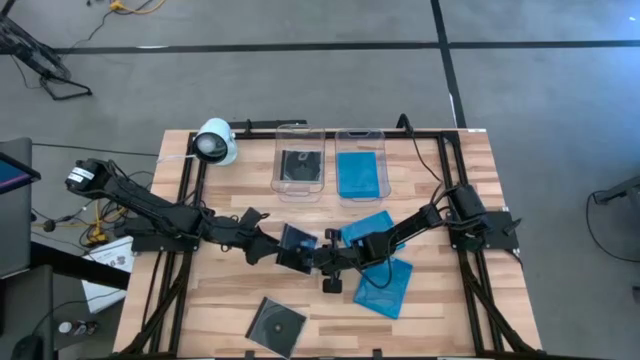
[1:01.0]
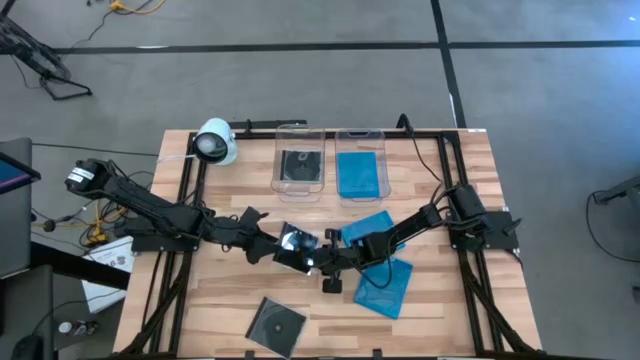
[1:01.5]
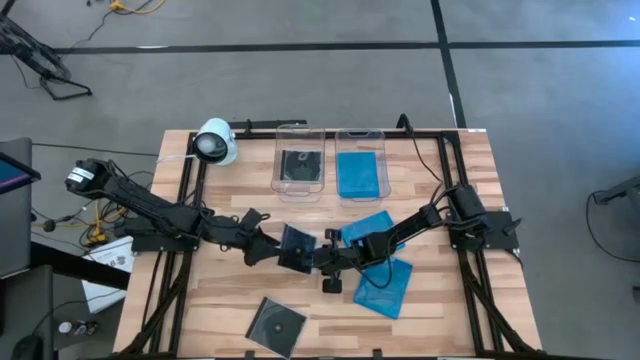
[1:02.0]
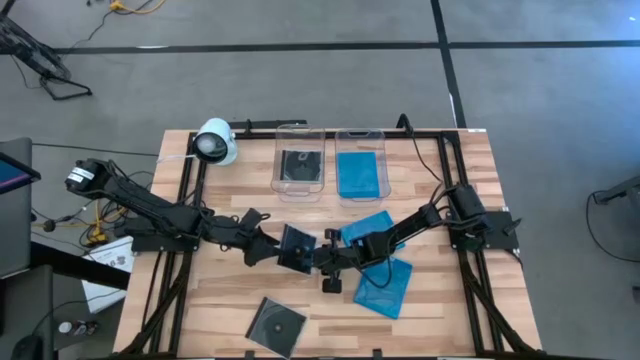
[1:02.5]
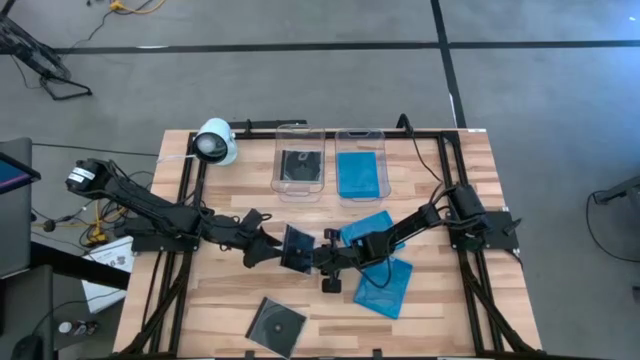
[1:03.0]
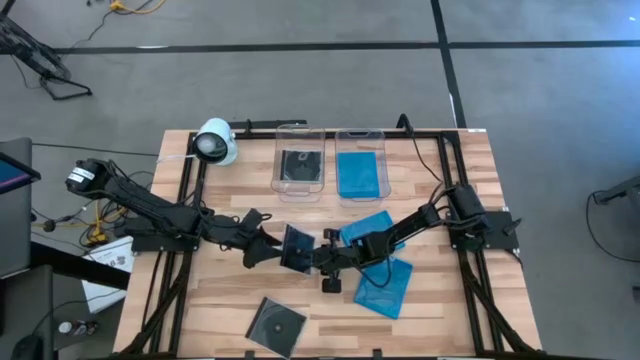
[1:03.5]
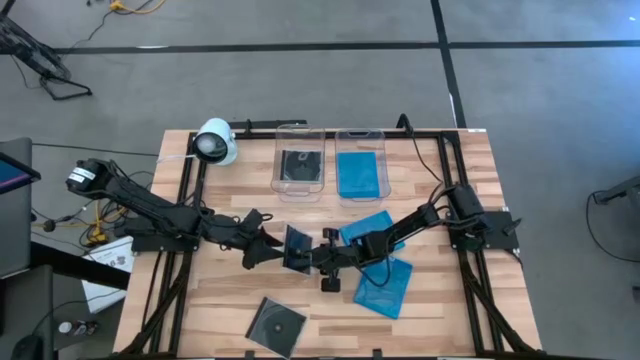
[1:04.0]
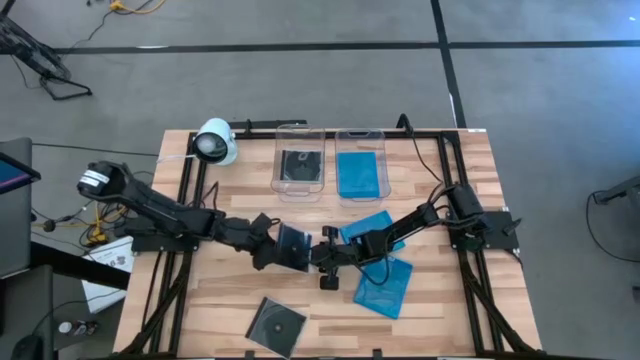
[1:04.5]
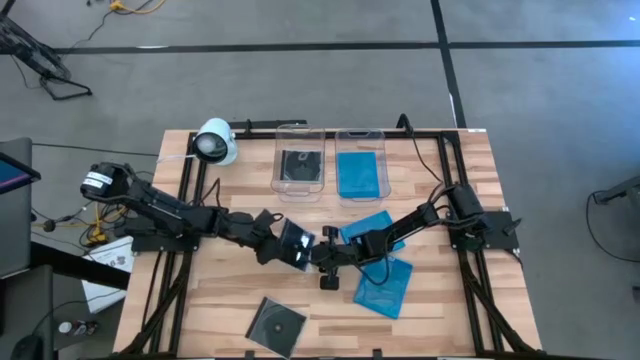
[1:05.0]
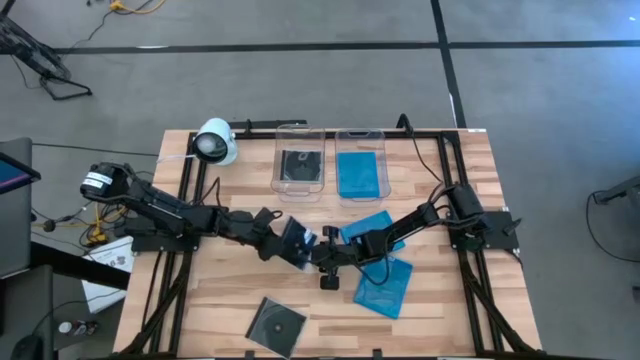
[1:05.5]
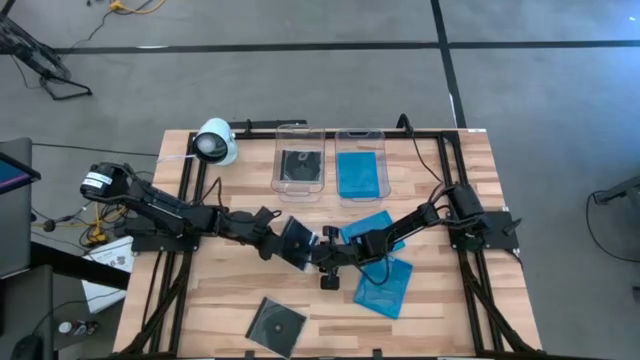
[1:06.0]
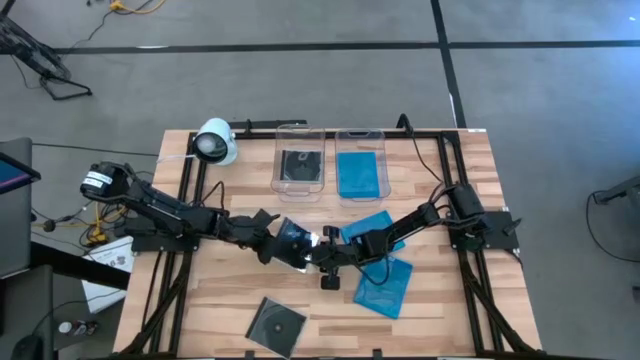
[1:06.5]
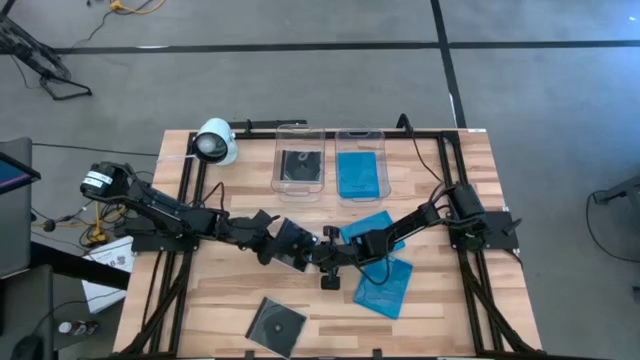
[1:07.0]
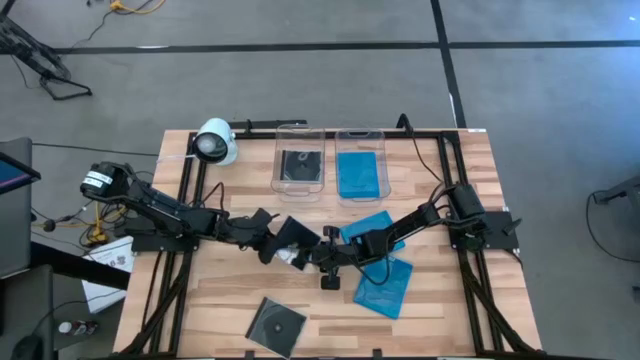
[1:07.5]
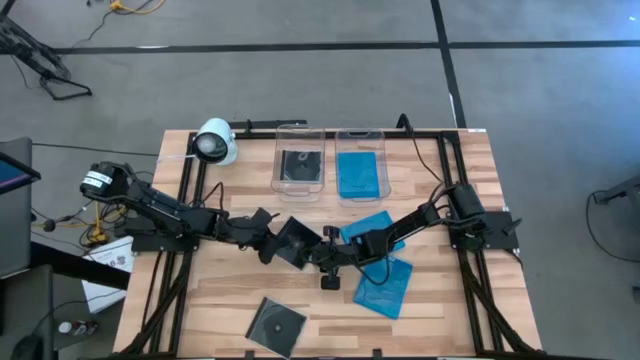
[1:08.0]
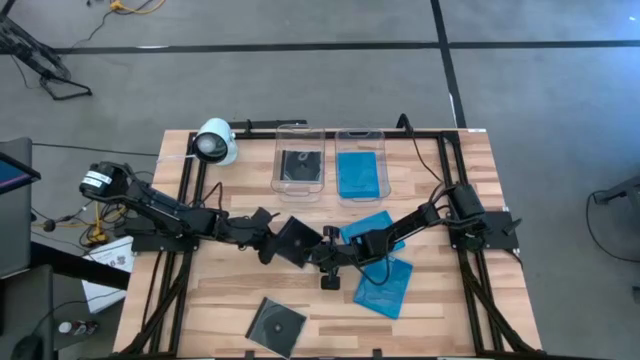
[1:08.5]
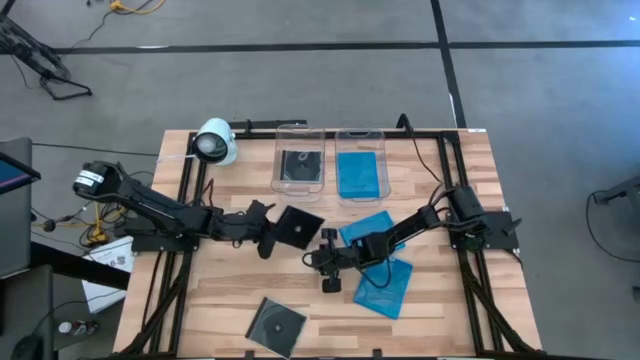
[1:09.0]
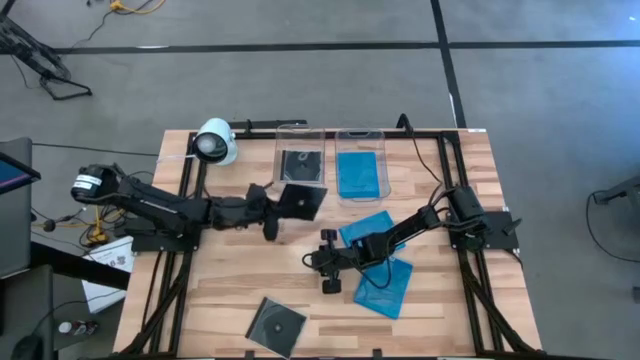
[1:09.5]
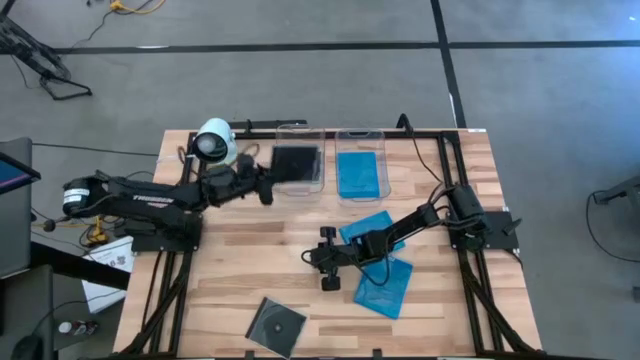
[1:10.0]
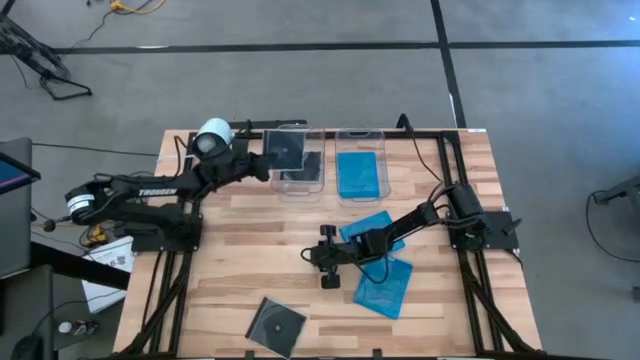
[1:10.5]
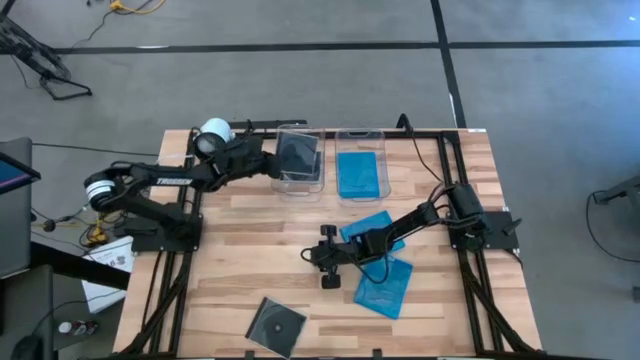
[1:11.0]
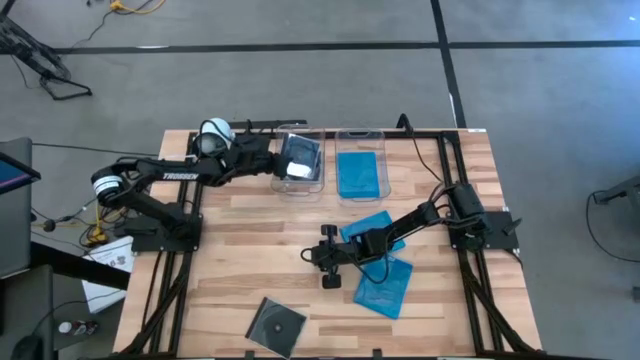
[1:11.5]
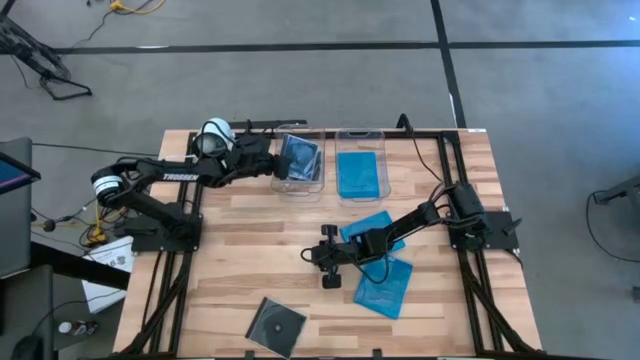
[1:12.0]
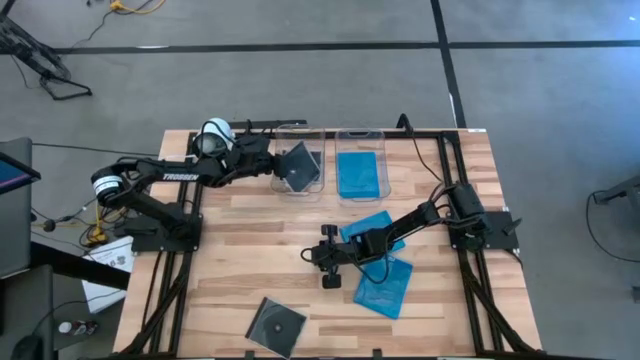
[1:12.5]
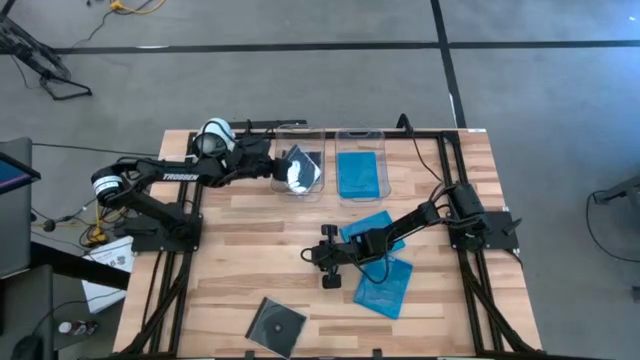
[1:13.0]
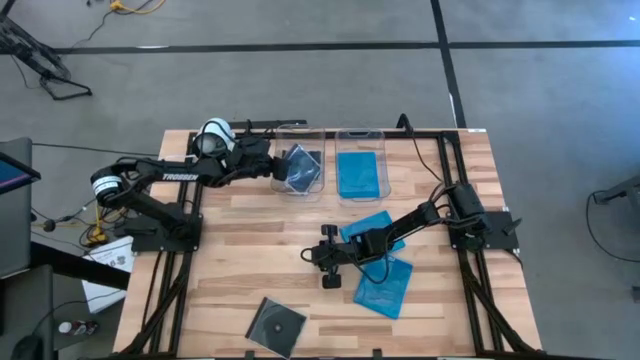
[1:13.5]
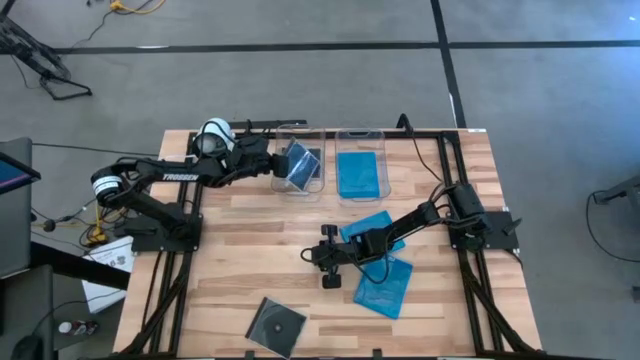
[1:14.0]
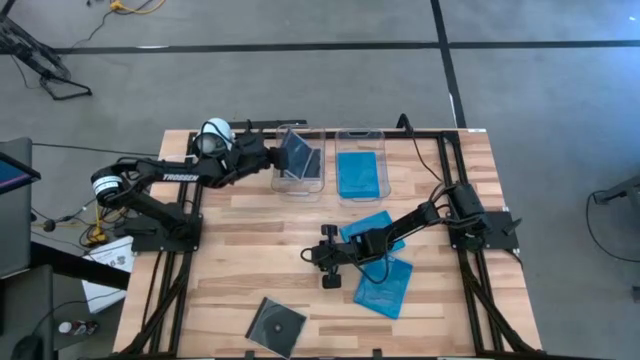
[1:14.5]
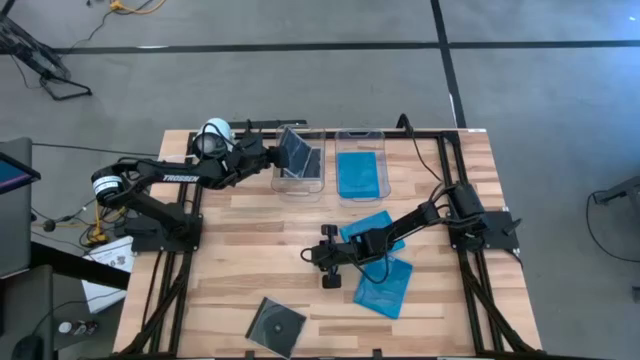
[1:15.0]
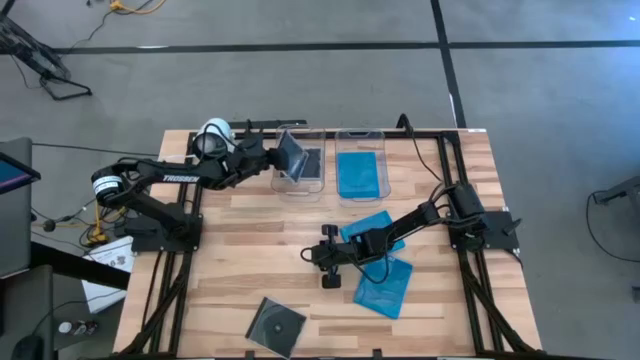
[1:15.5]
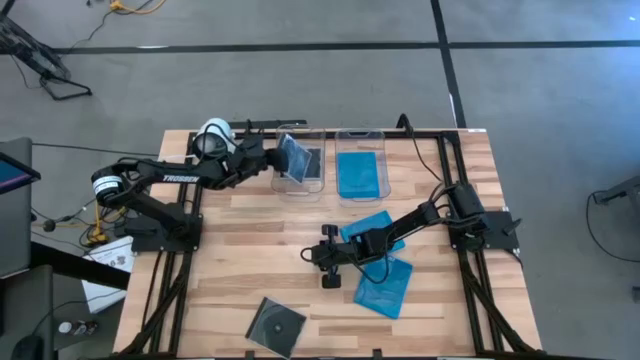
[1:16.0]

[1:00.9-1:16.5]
Task: Pick & place jewel cases by type
Put the top black CD case into the left transparent bin

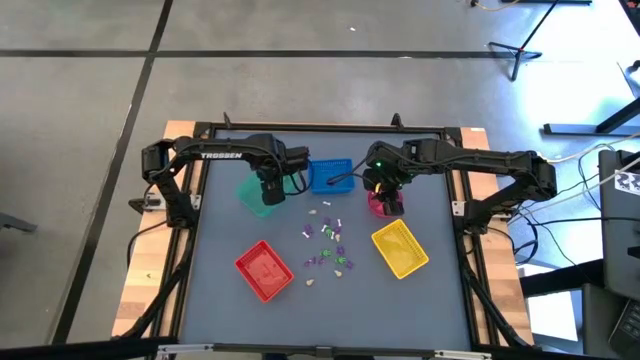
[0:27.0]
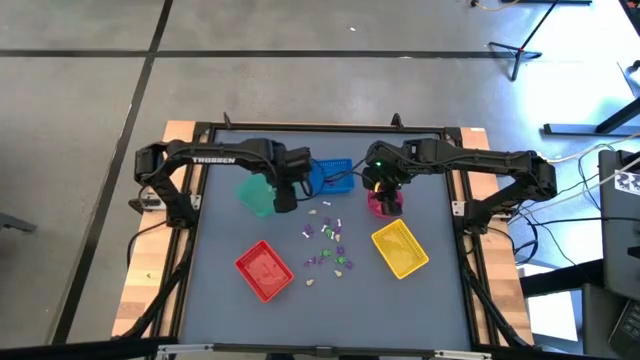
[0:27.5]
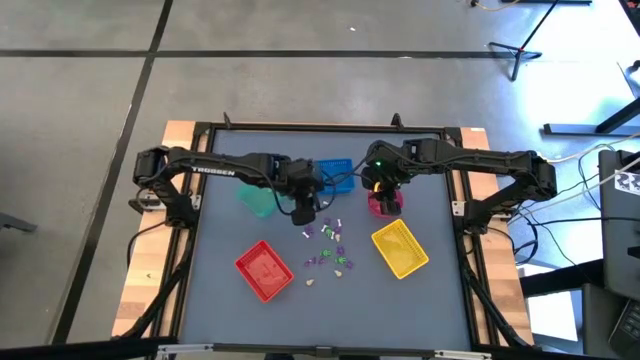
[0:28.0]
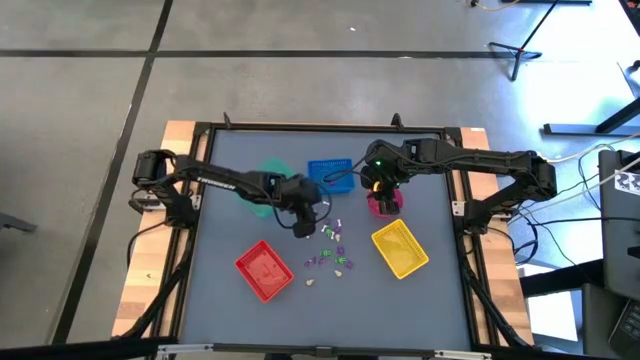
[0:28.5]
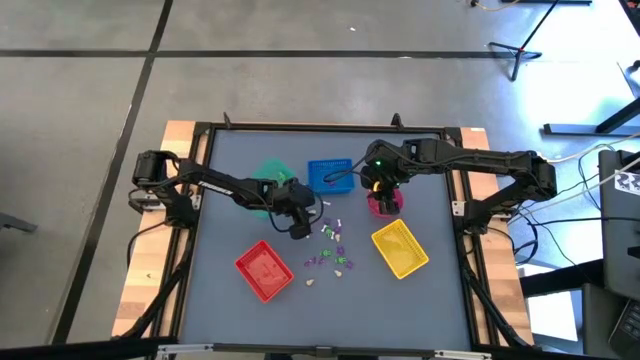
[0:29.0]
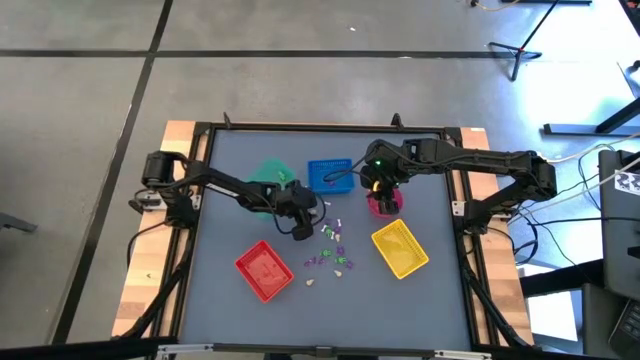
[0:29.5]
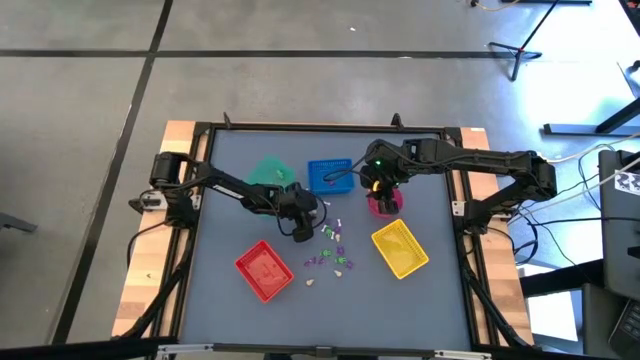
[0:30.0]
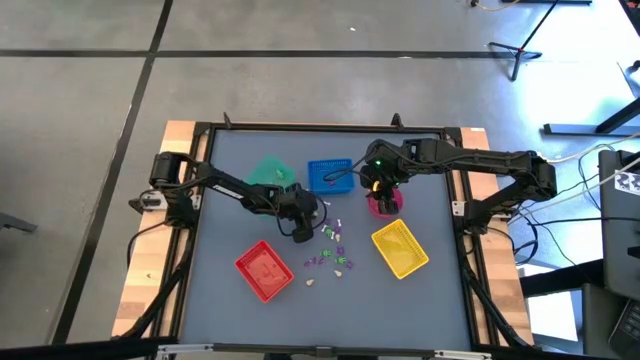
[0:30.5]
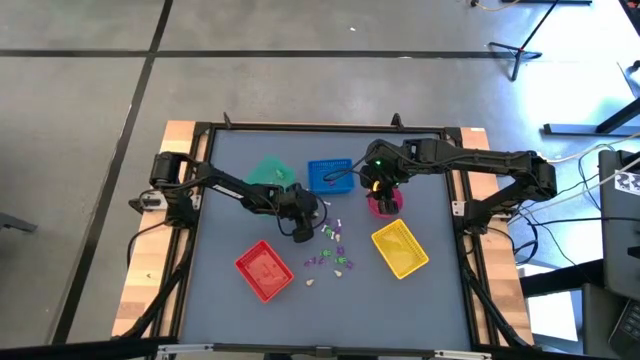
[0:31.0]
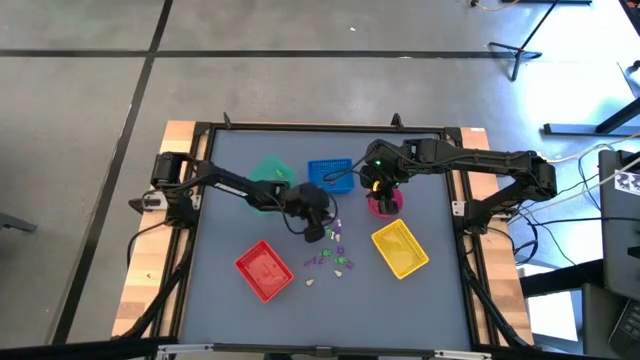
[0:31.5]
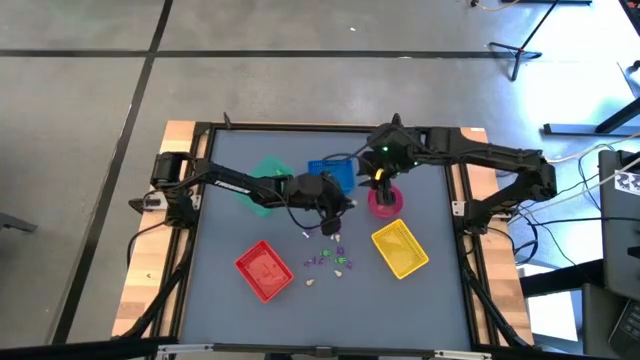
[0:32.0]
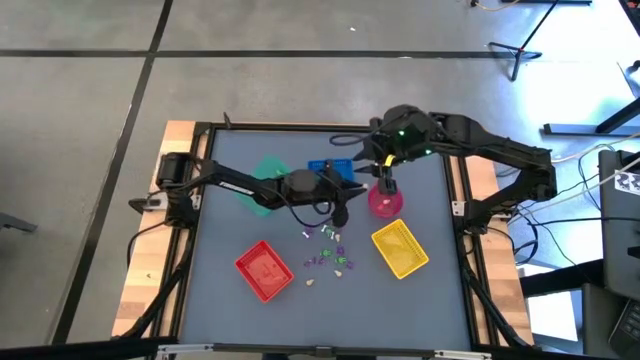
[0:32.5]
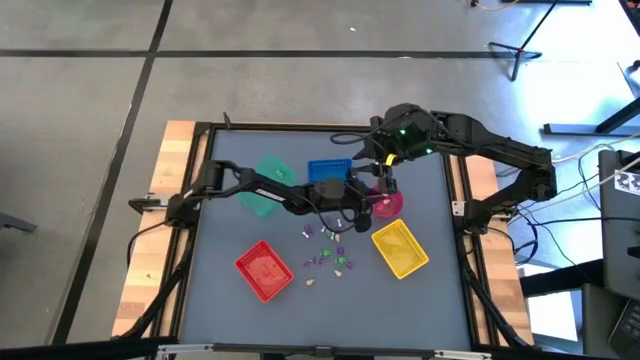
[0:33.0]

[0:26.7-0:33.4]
Task: Sort Halloween decoration
Put the yellow skull toy into the red bin
